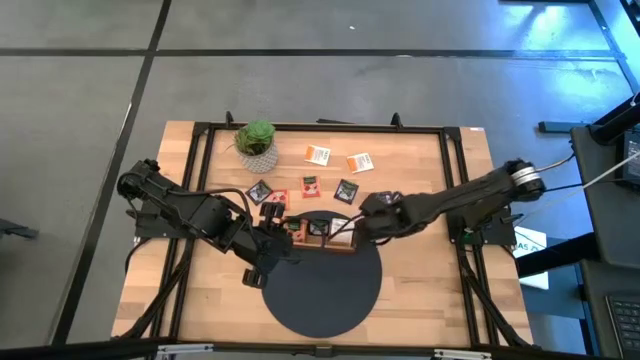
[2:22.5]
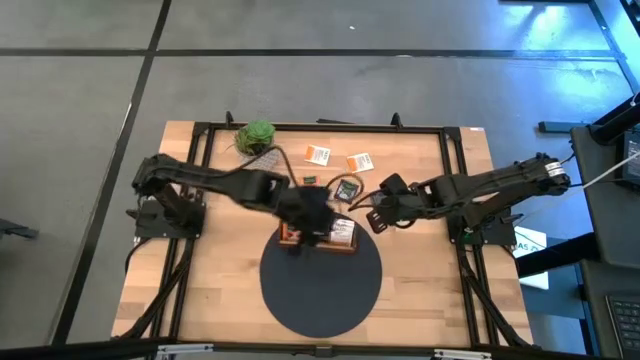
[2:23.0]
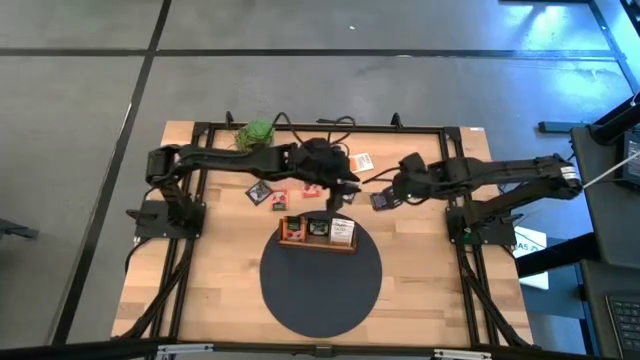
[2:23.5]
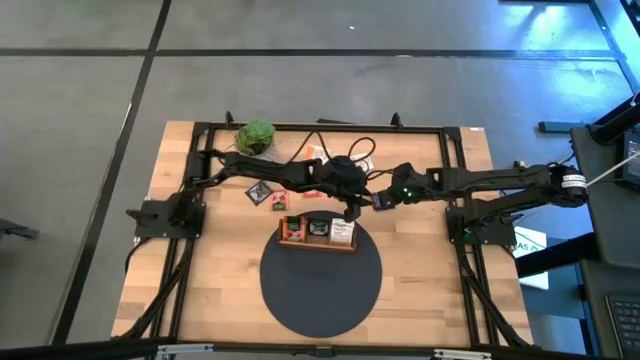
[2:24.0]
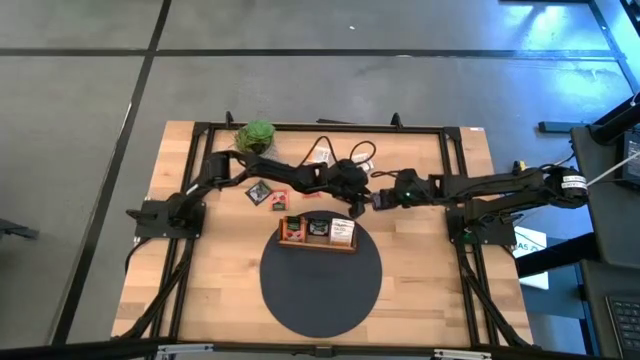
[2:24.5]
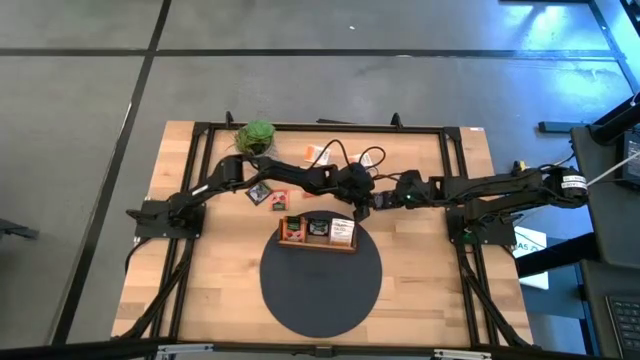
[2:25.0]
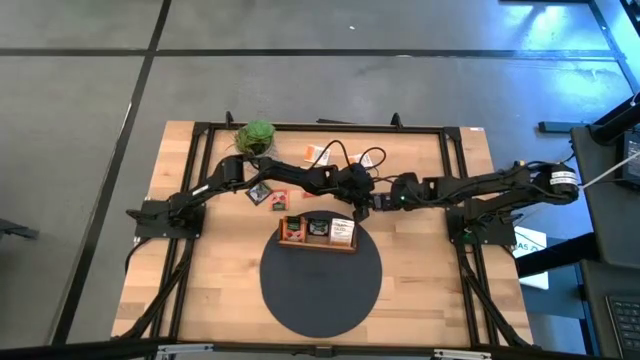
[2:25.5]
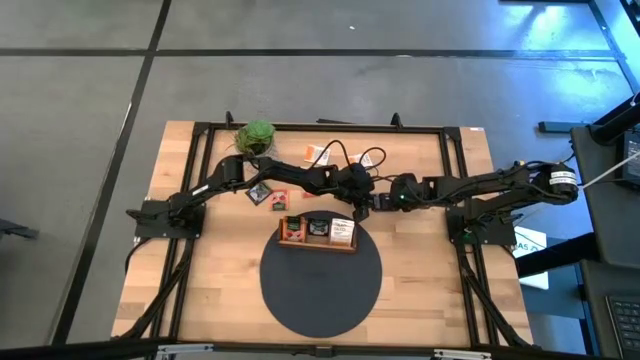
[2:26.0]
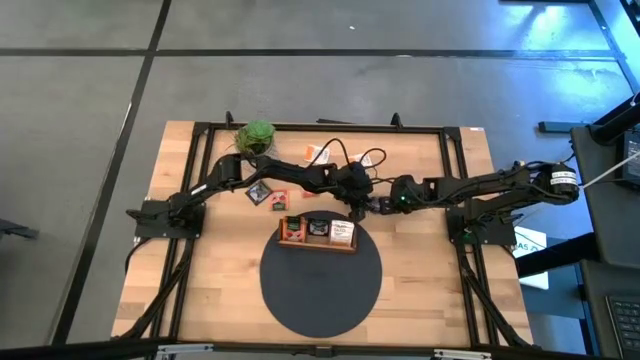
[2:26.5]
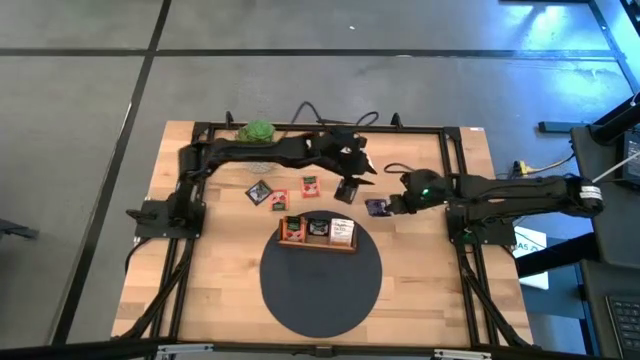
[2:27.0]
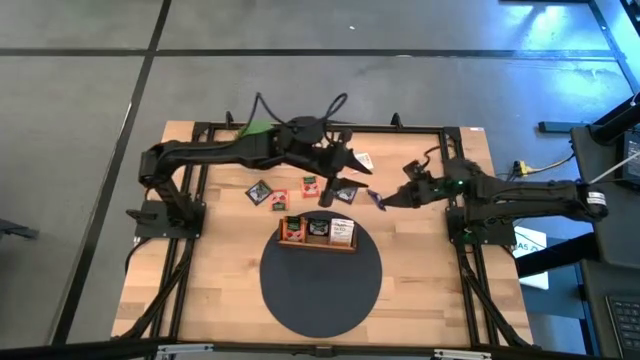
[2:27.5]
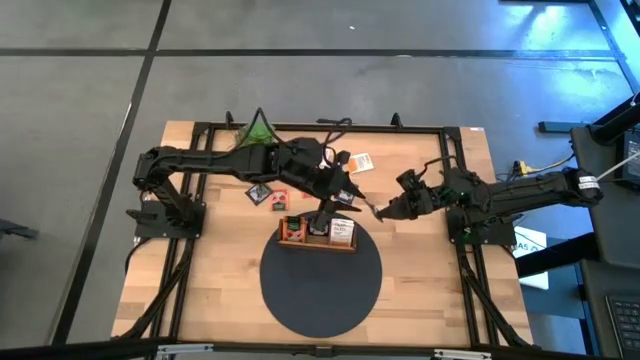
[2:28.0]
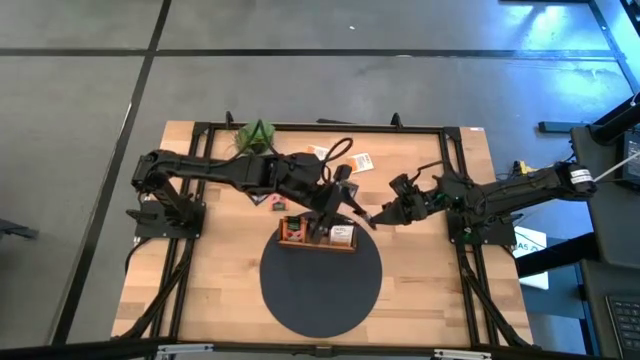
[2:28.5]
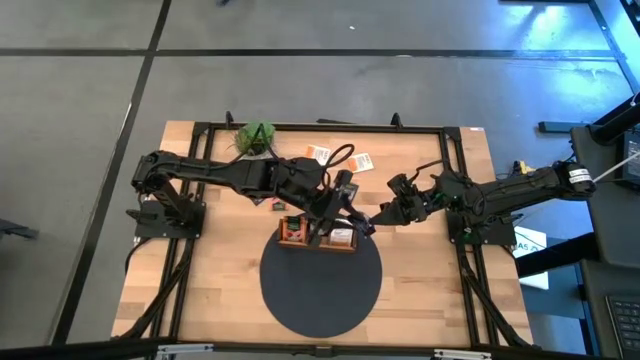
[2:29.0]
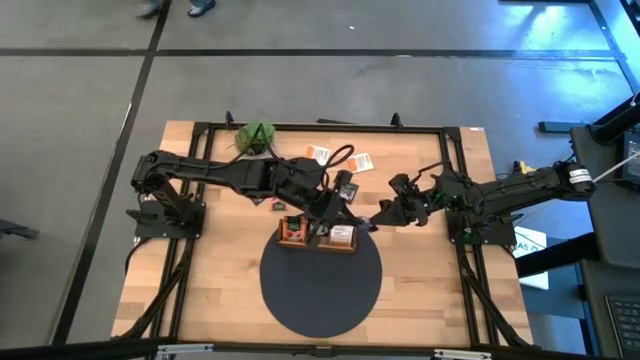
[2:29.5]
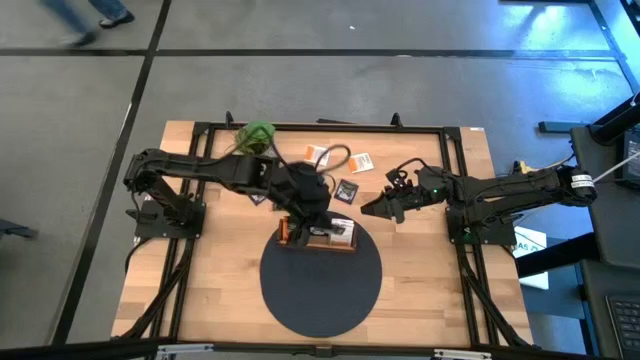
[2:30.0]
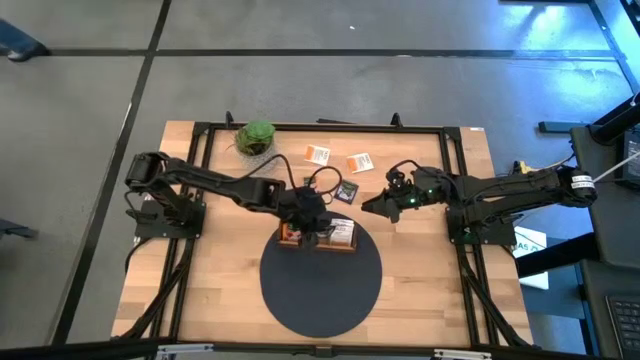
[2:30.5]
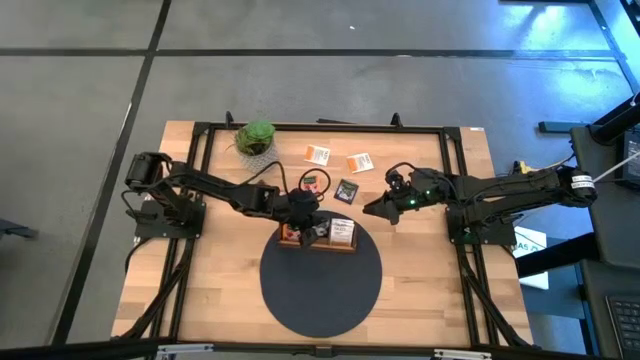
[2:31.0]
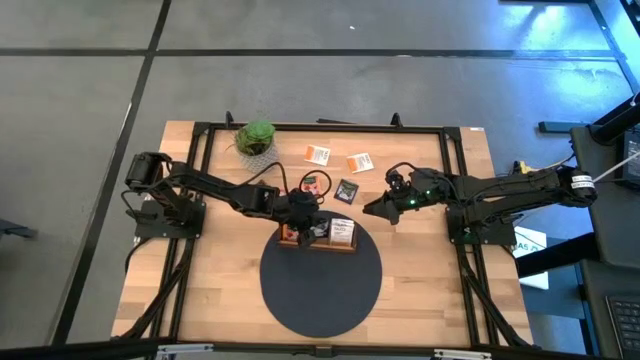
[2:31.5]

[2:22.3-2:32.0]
Task: Pick & Place Tea
Put the right violet tea bag into the middle slot of the wooden organizer

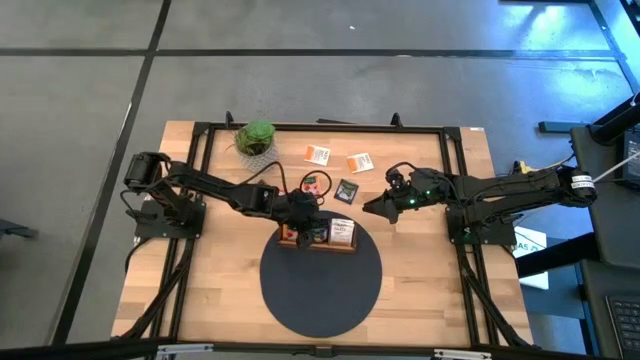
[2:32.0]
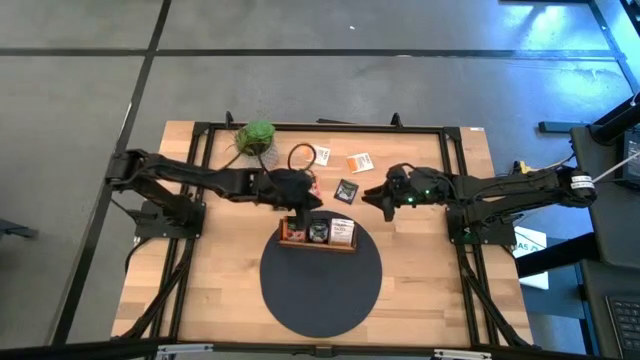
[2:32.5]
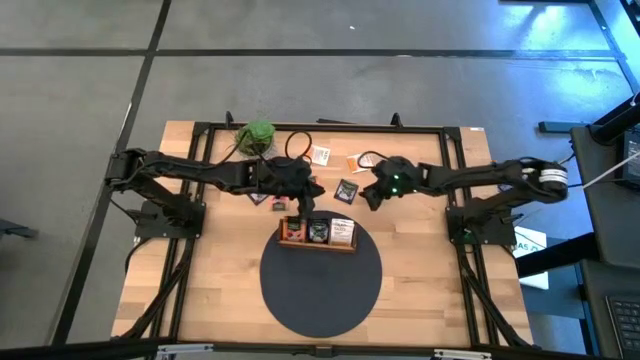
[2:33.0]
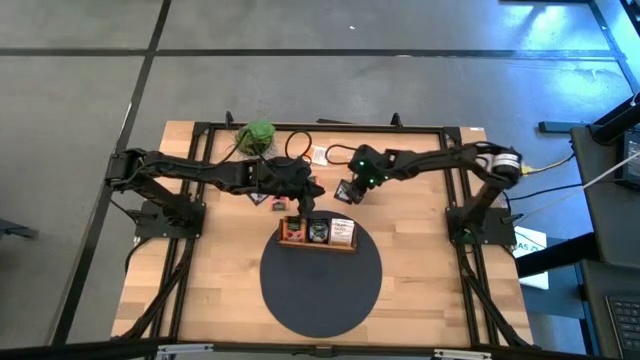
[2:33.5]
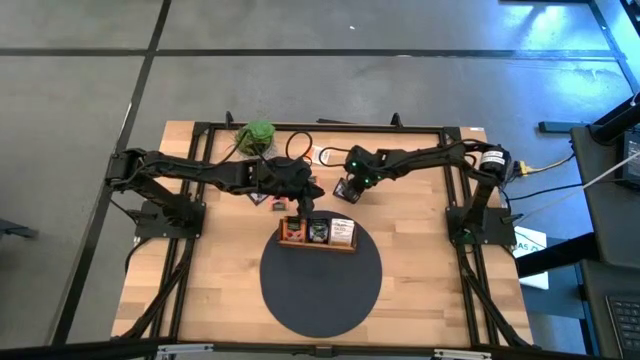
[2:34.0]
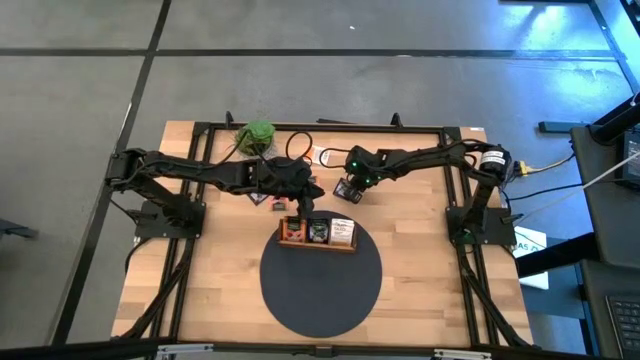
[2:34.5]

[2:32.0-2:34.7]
Put the violet tea bag into the middle slot of the wooden organizer

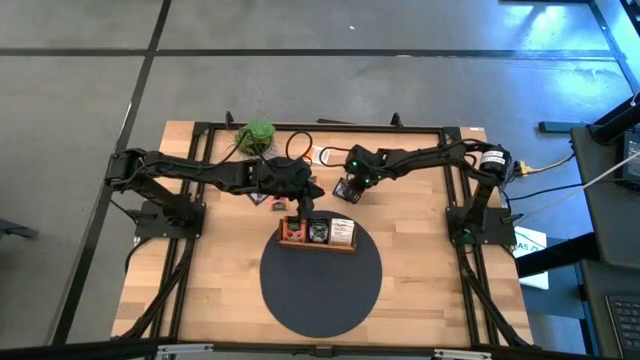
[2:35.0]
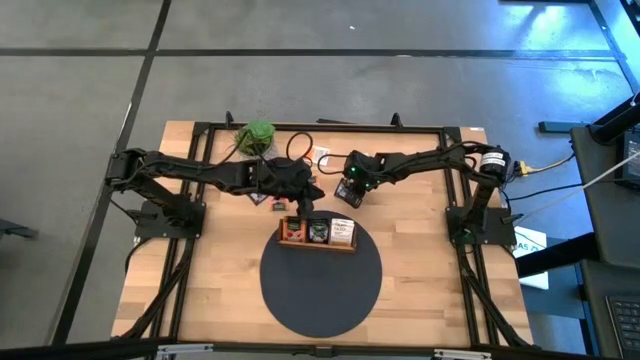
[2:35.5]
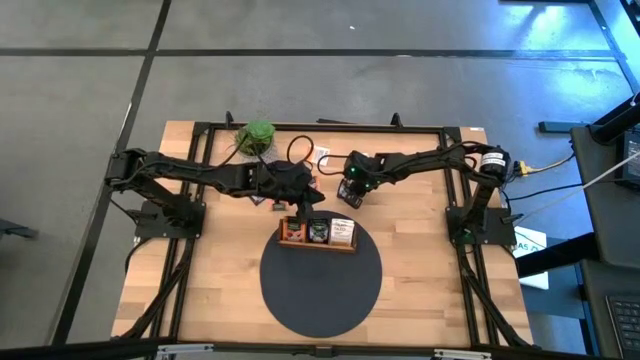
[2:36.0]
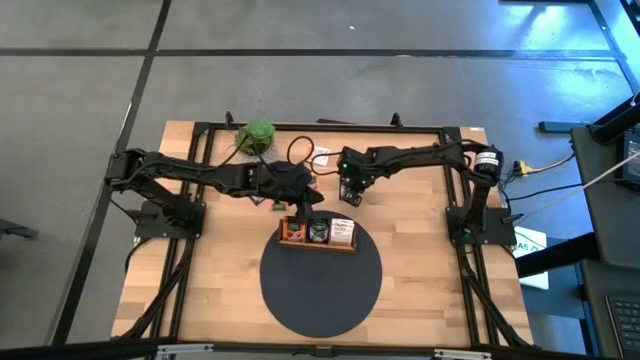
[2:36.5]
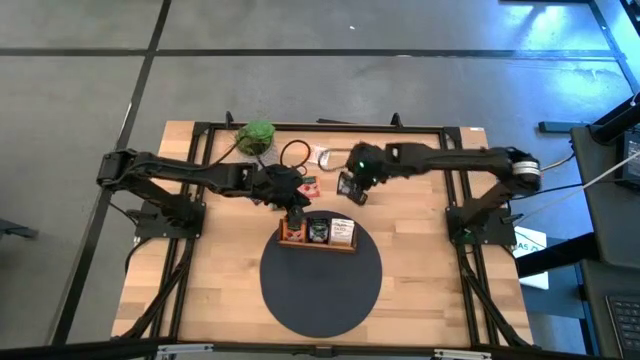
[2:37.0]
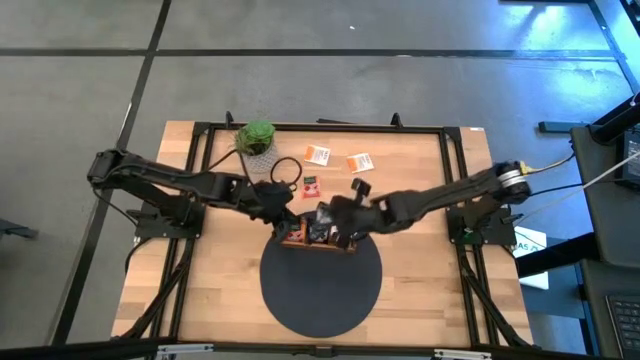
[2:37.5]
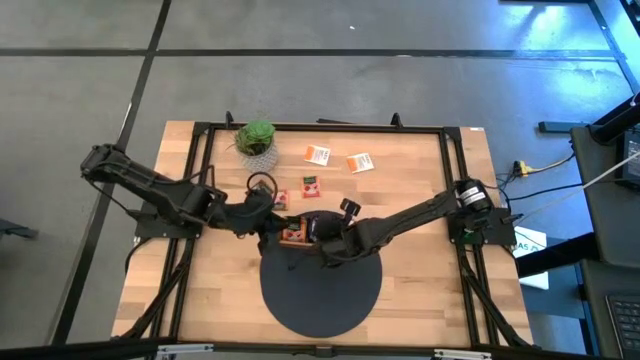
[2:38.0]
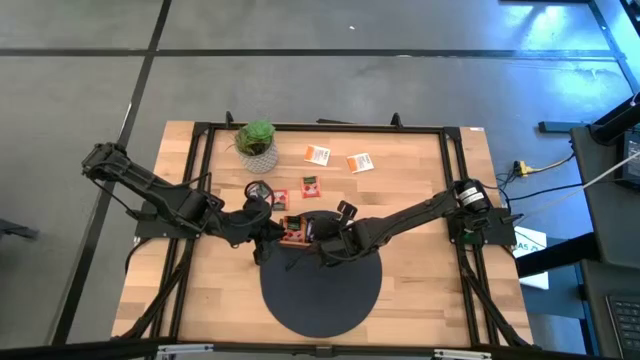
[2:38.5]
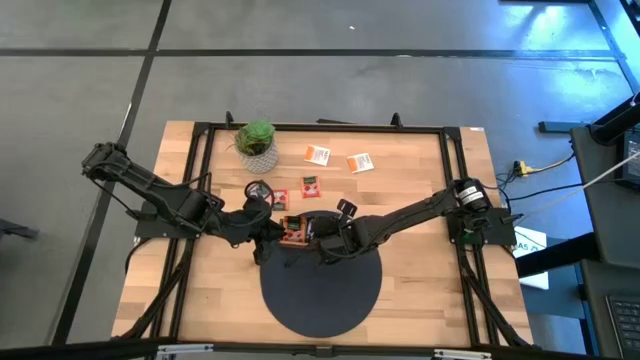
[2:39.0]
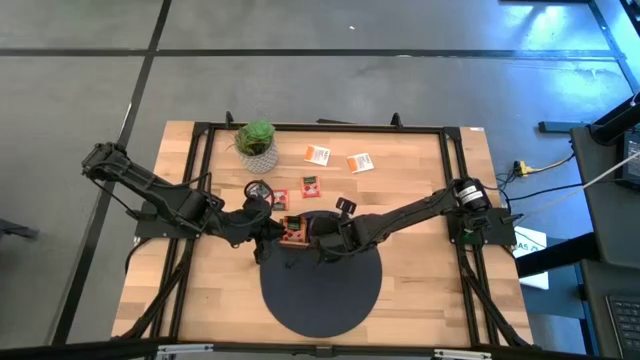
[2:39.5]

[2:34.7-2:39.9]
Put the violet tea bag into the middle slot of the wooden organizer

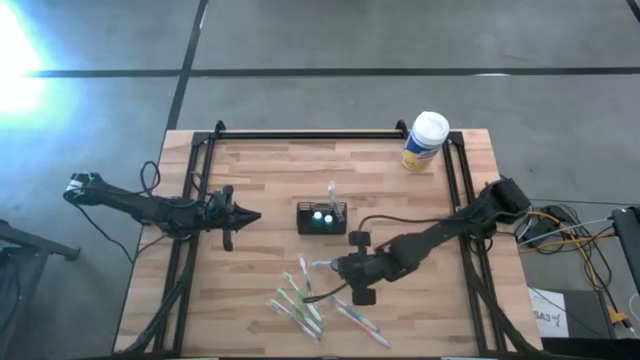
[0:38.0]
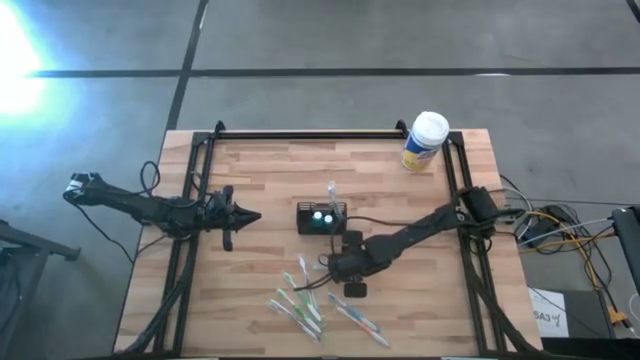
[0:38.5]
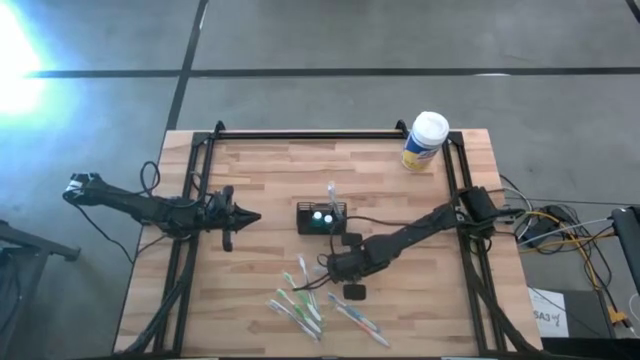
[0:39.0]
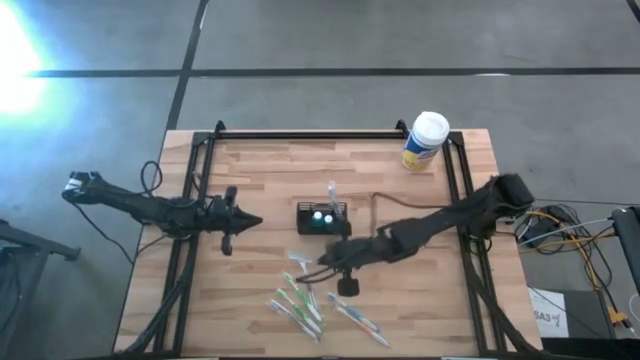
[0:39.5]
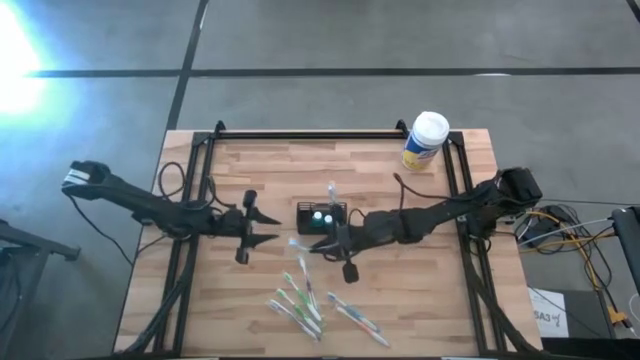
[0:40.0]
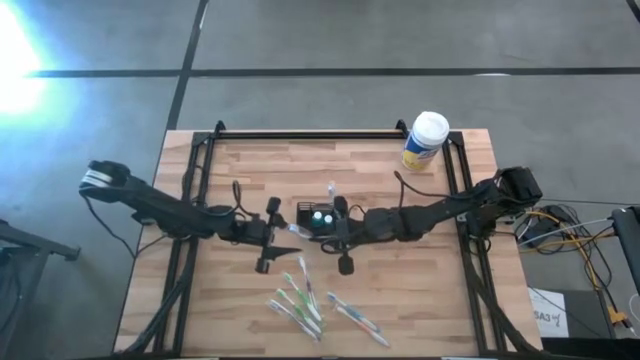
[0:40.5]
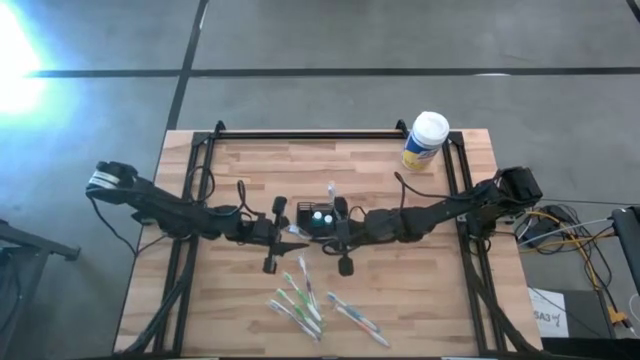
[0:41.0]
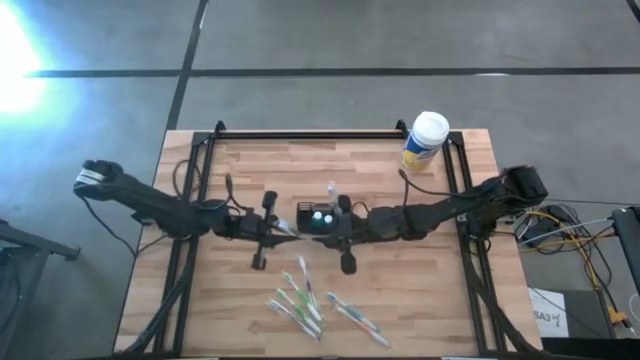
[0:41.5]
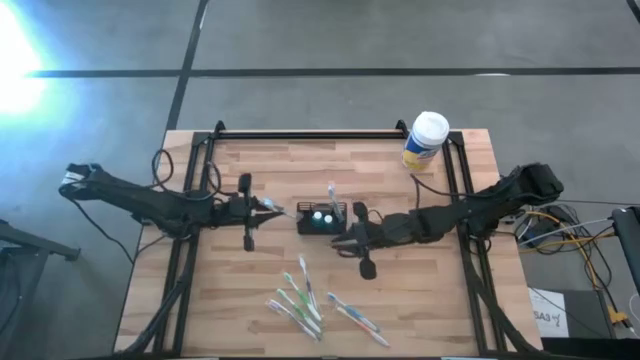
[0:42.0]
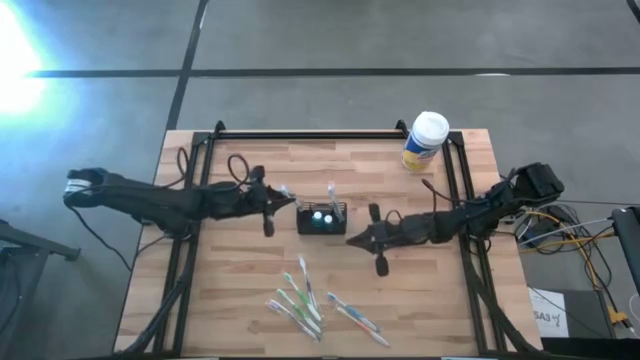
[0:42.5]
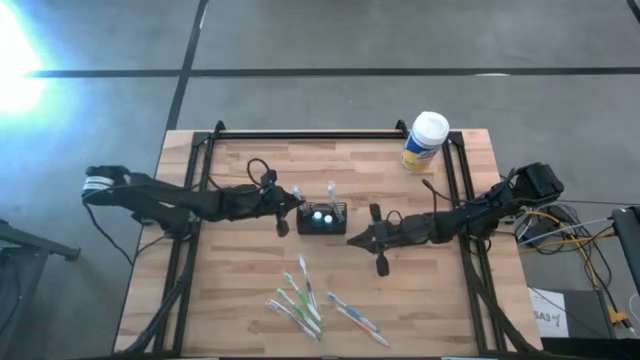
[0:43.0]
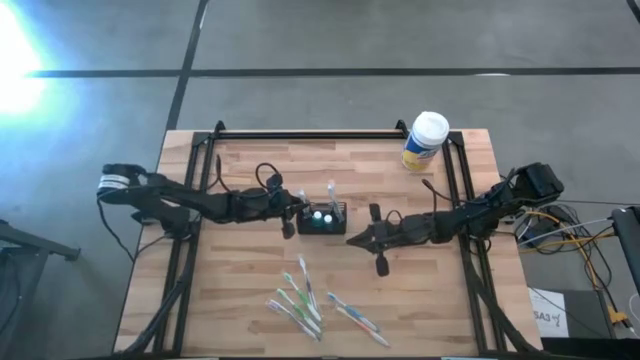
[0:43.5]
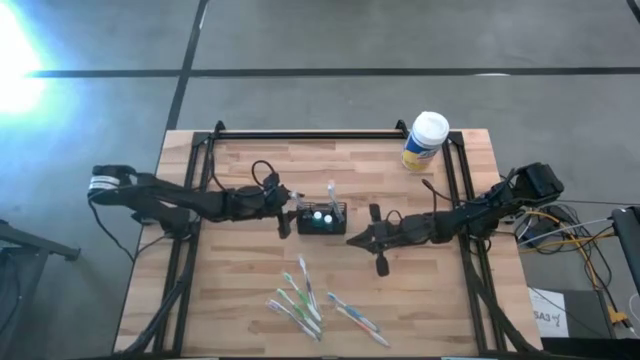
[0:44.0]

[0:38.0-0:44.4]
Task: Pick & Place toothbrushing station
Put the top blue toothbrush into the black mesh organizer
